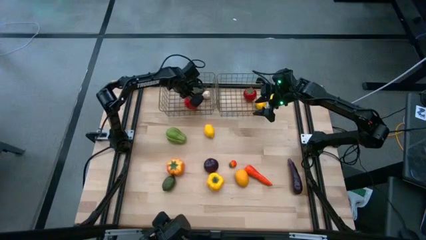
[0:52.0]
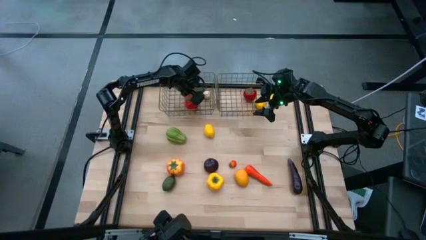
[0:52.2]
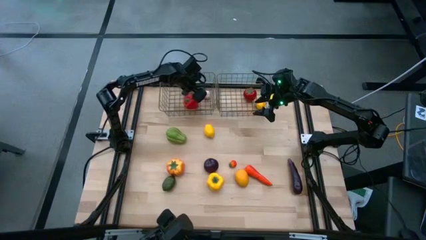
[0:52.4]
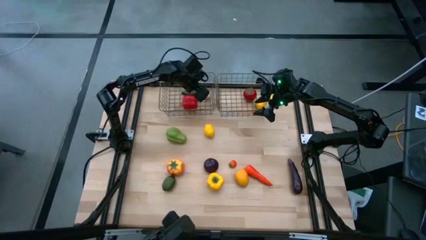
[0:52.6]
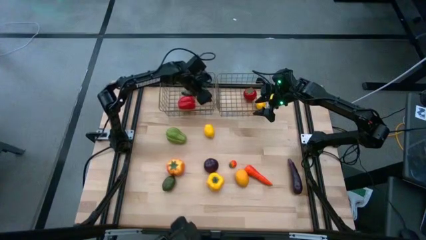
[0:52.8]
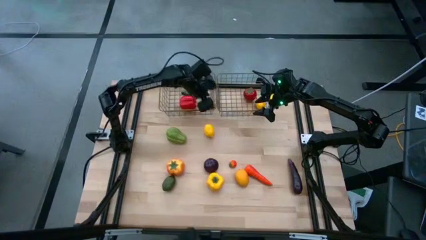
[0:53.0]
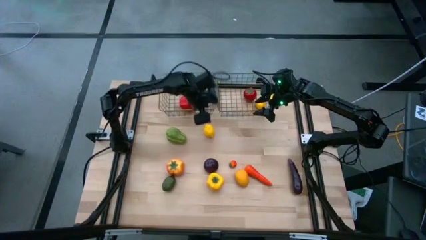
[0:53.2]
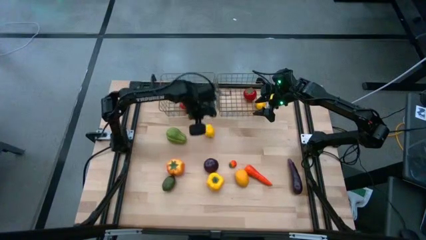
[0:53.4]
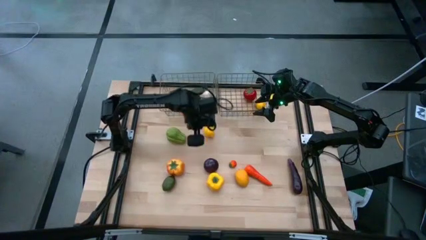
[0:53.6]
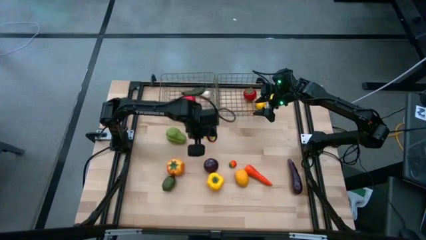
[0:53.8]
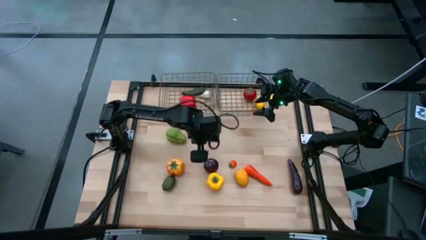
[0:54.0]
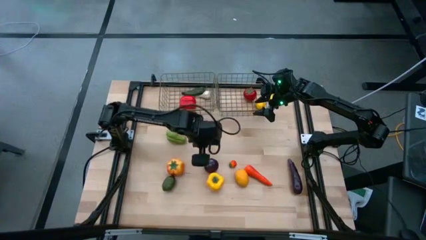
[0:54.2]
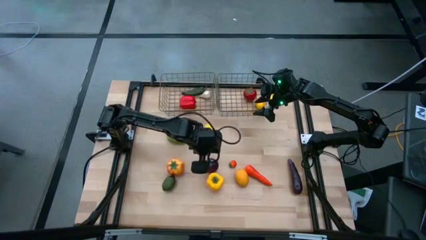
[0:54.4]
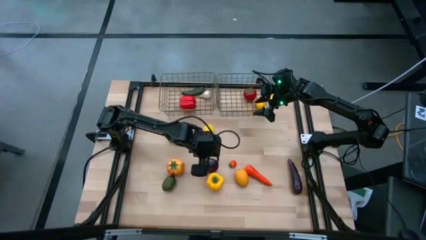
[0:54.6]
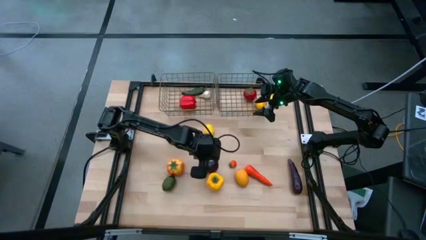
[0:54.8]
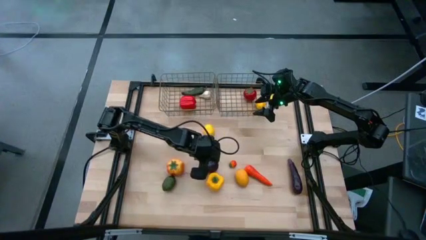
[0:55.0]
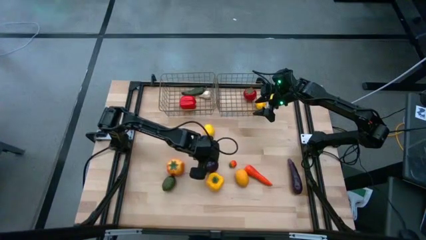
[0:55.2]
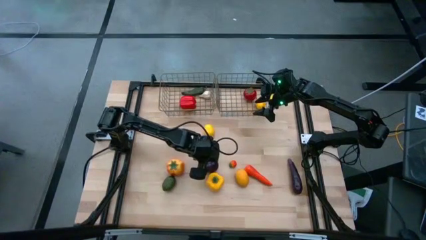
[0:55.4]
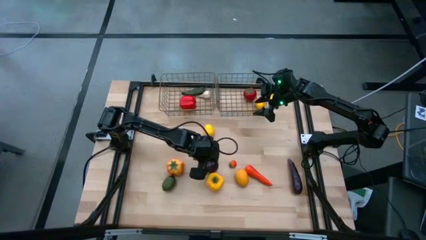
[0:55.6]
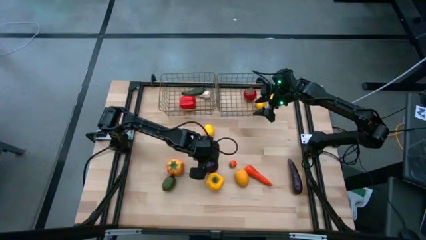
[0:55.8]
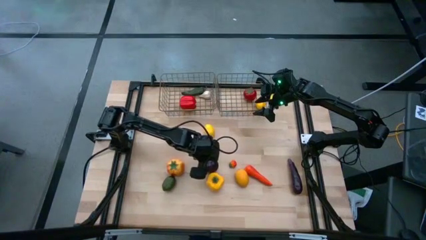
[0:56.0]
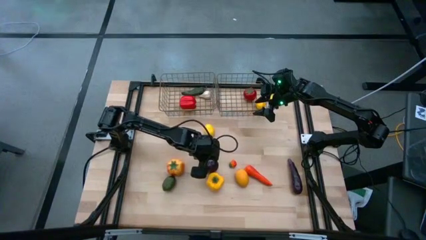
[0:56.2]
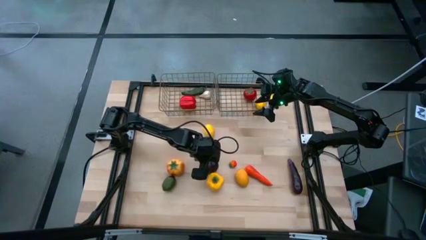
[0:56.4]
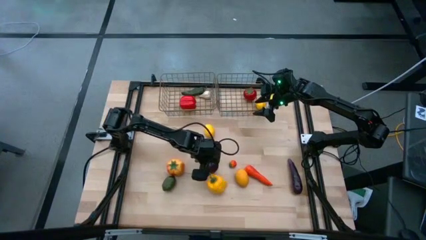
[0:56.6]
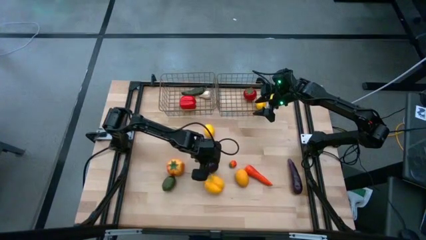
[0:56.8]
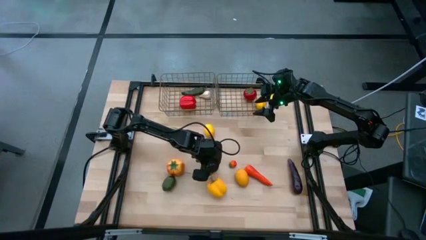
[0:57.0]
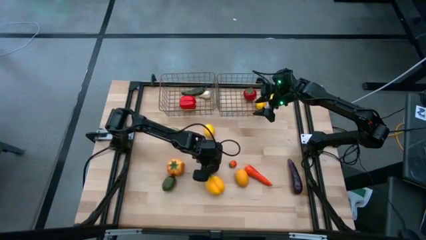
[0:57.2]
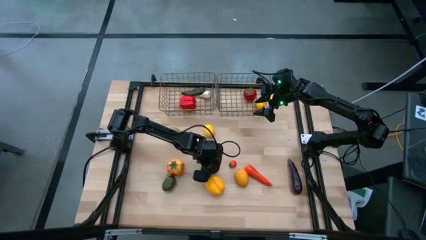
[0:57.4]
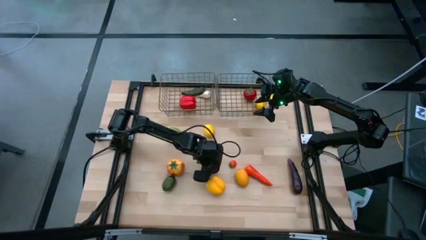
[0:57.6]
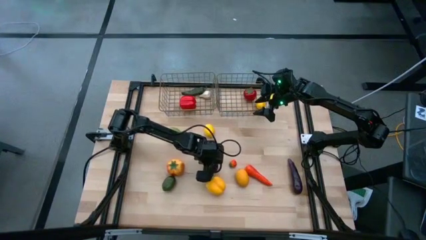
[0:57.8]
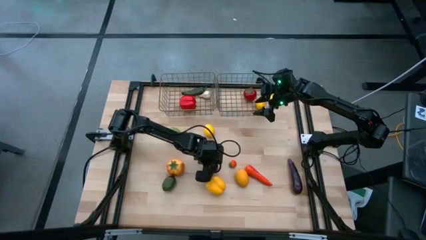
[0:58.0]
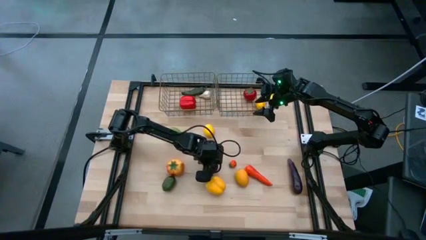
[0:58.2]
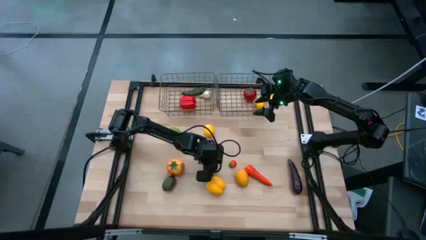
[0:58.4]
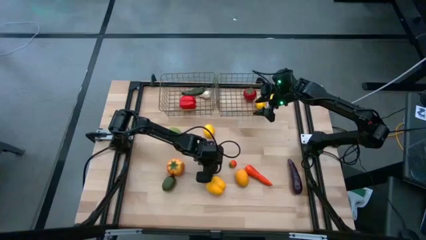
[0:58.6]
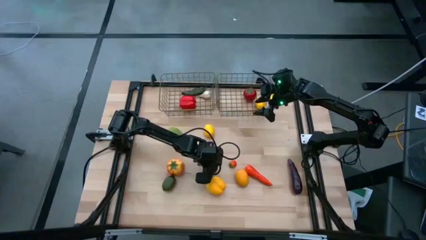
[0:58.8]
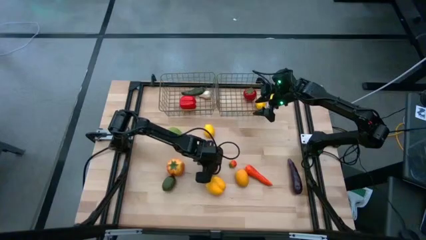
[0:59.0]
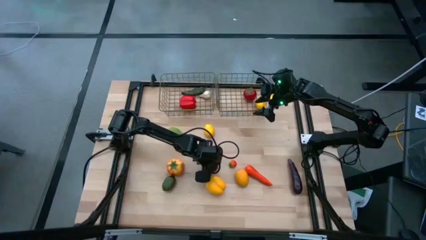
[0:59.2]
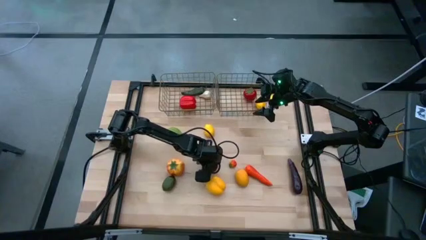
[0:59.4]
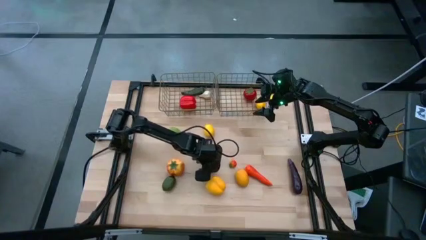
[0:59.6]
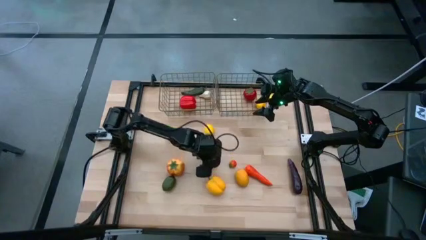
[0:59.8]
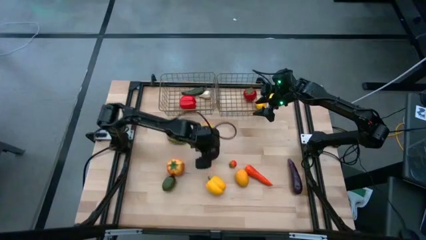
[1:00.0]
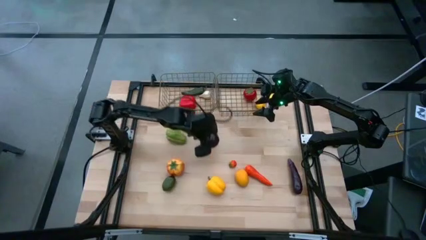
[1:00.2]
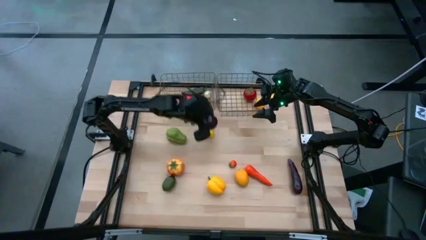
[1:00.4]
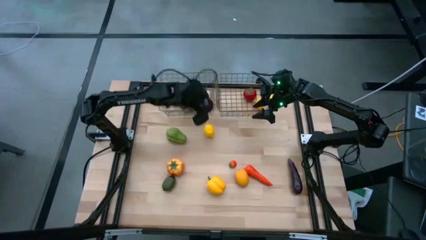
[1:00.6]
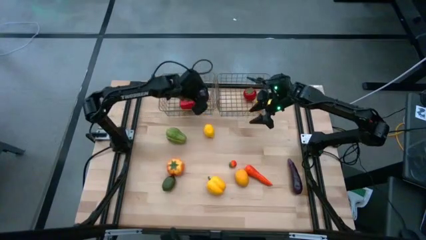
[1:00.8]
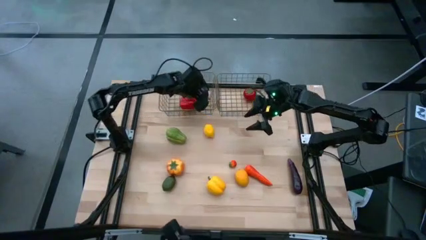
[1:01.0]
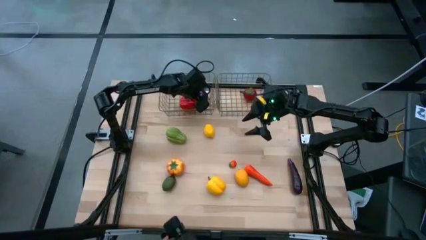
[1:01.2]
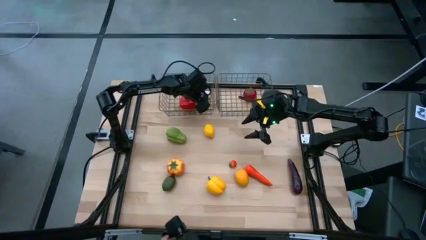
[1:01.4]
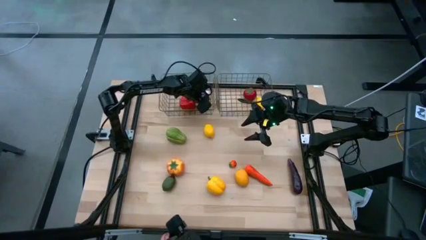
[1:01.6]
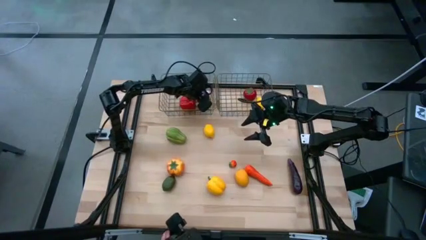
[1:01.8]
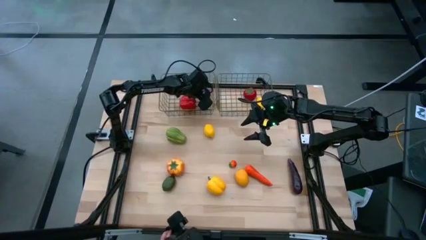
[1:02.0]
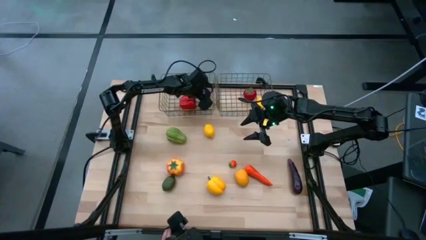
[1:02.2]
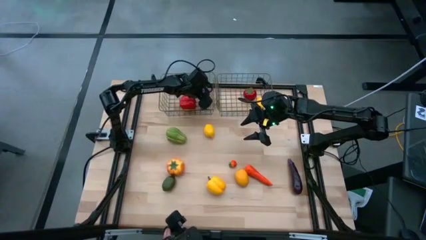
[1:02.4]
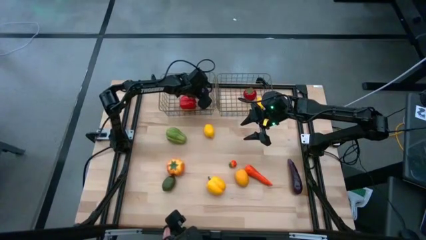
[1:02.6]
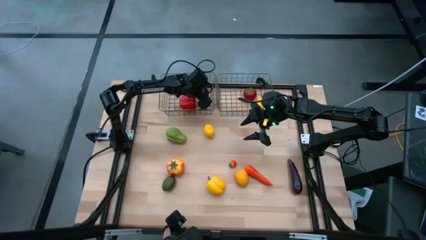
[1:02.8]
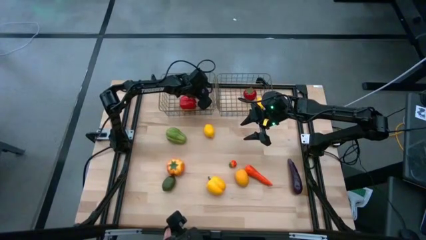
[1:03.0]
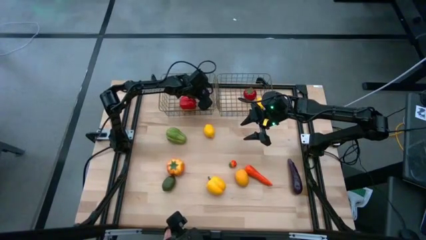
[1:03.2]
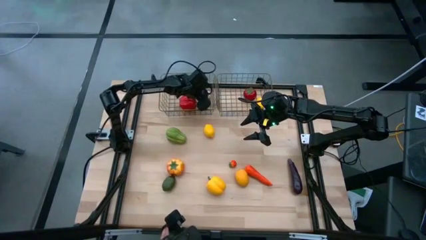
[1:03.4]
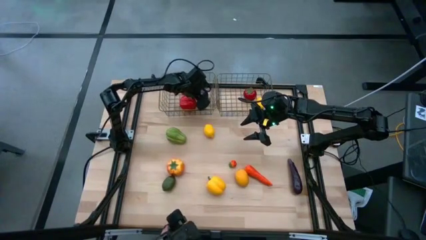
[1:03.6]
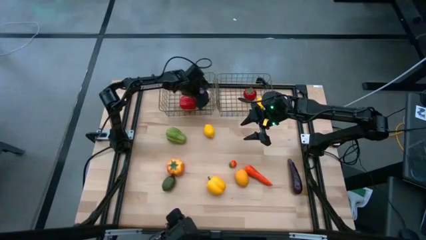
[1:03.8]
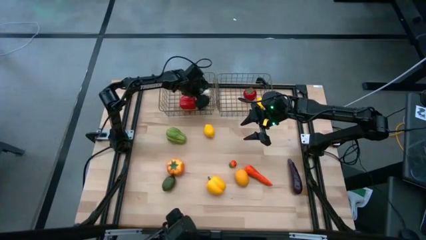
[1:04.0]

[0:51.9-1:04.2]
Task: Sort produce into baskets
Put the purple onion into the left golden wire basket
